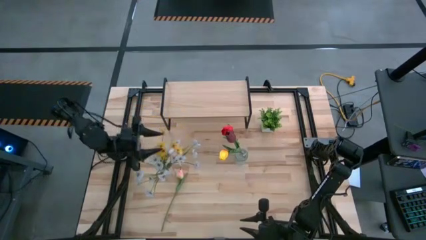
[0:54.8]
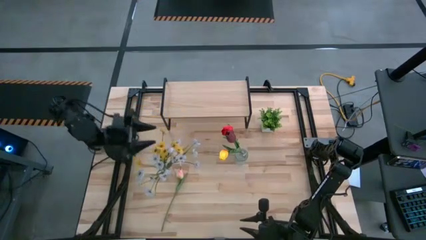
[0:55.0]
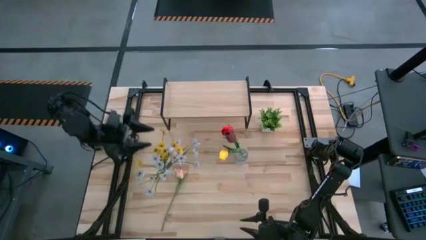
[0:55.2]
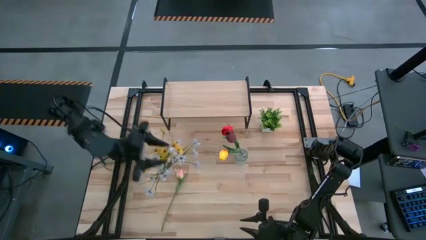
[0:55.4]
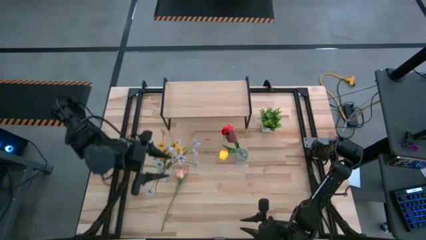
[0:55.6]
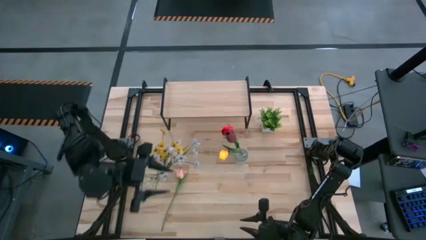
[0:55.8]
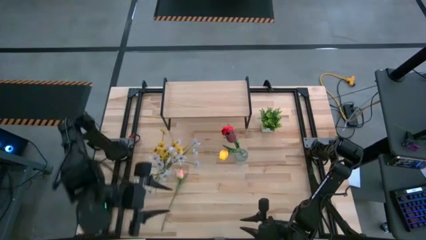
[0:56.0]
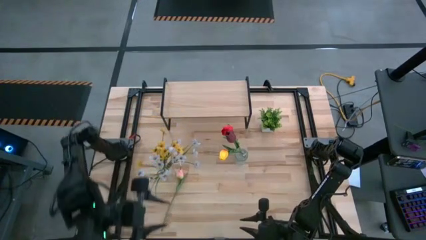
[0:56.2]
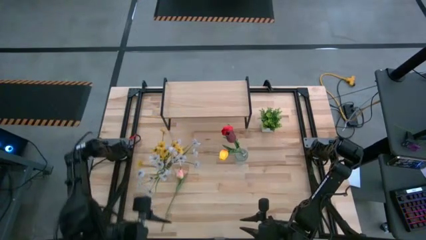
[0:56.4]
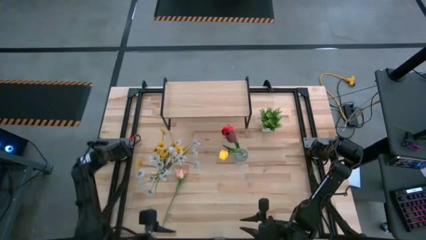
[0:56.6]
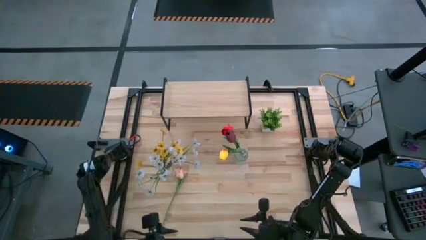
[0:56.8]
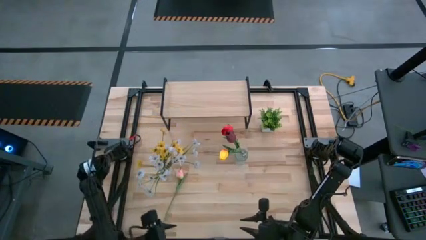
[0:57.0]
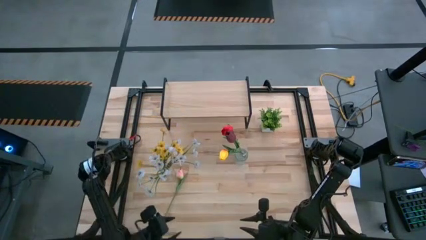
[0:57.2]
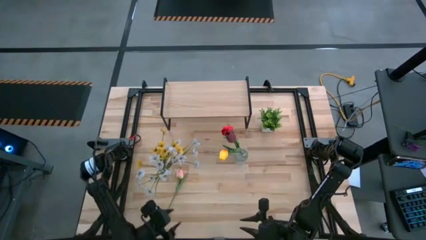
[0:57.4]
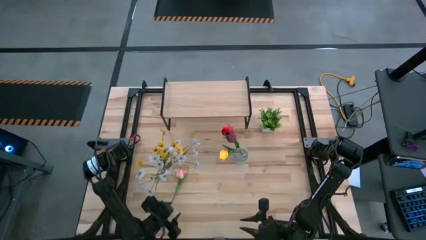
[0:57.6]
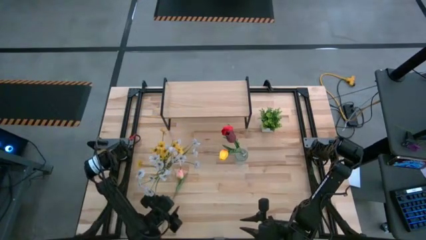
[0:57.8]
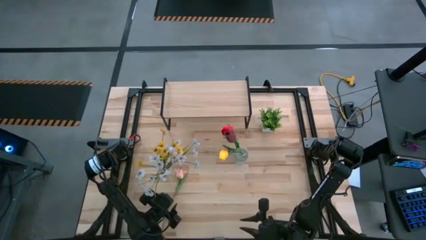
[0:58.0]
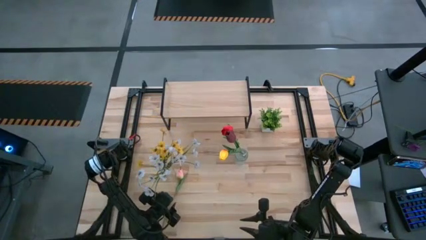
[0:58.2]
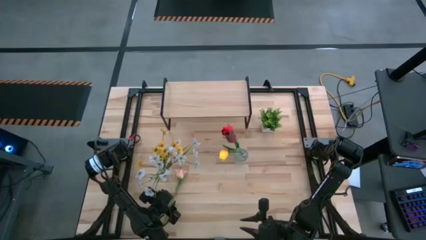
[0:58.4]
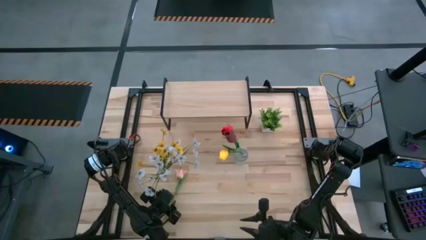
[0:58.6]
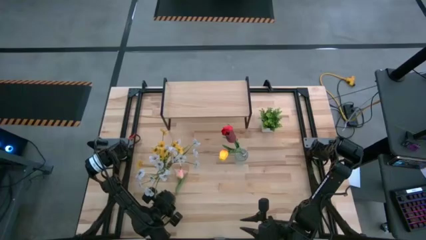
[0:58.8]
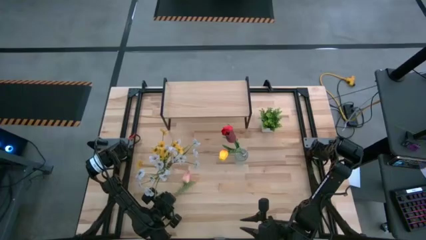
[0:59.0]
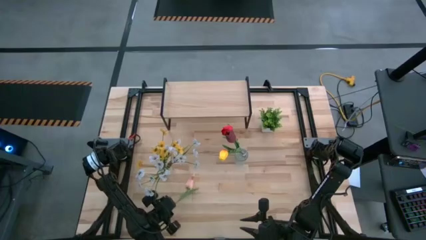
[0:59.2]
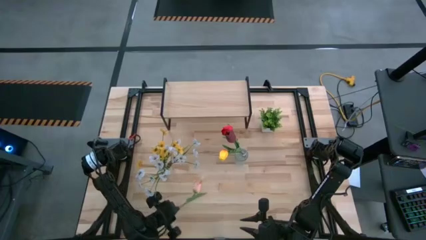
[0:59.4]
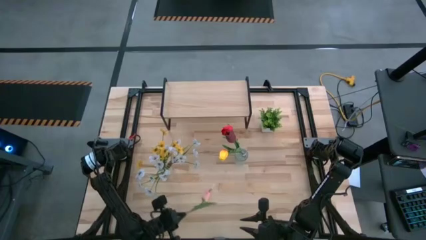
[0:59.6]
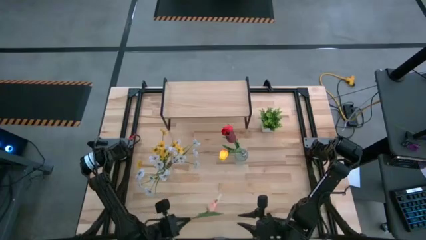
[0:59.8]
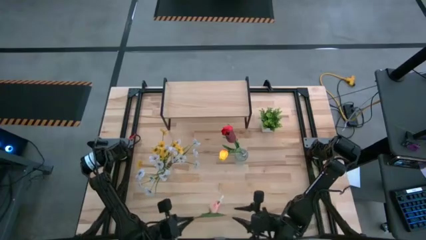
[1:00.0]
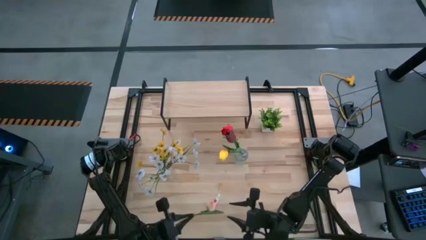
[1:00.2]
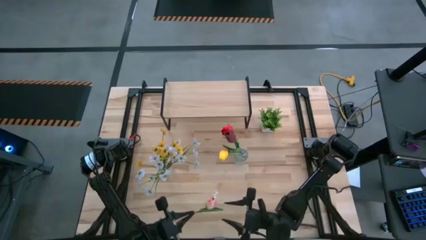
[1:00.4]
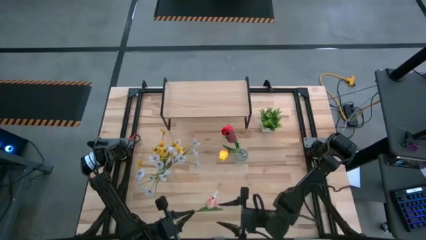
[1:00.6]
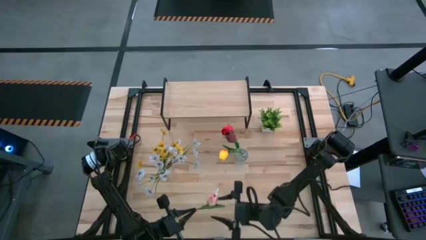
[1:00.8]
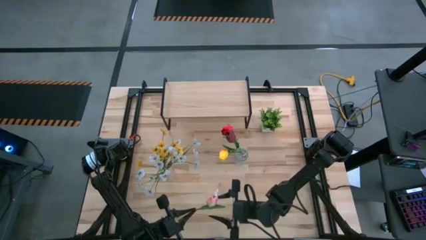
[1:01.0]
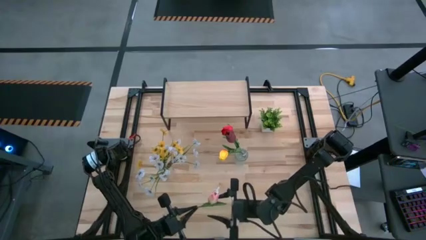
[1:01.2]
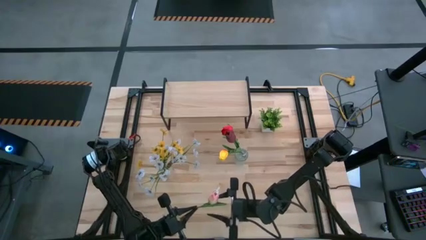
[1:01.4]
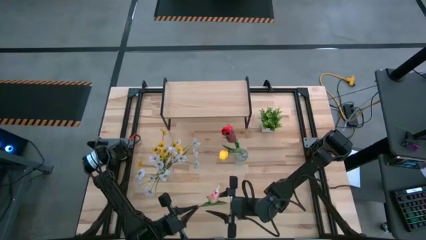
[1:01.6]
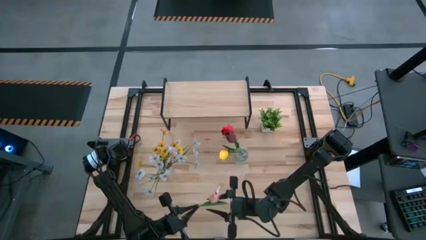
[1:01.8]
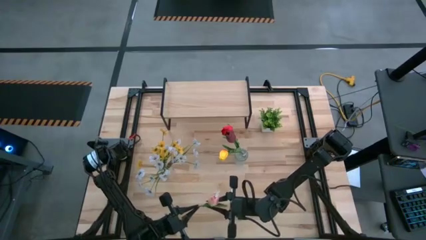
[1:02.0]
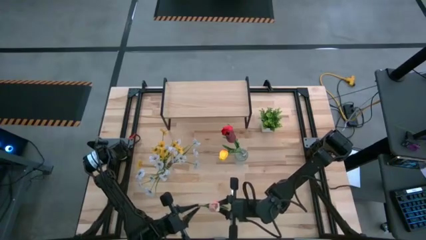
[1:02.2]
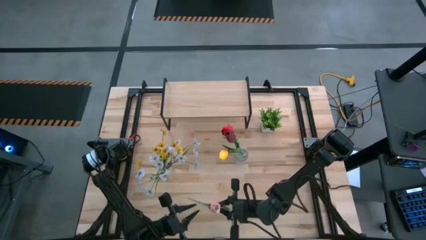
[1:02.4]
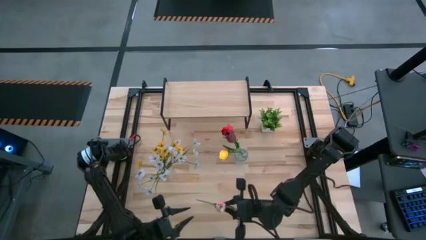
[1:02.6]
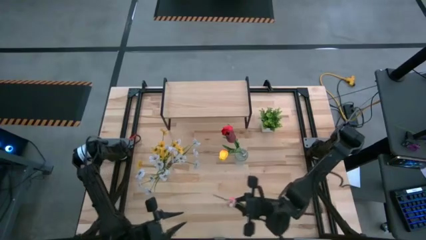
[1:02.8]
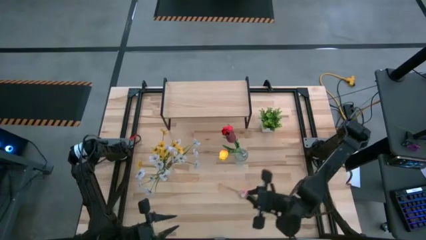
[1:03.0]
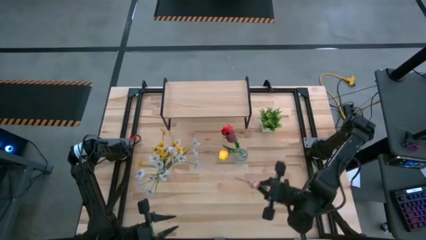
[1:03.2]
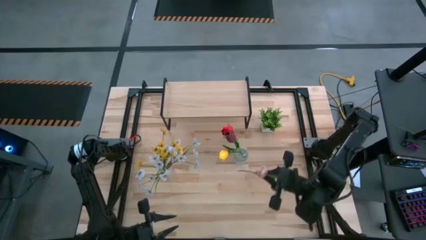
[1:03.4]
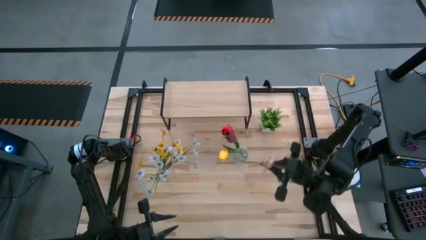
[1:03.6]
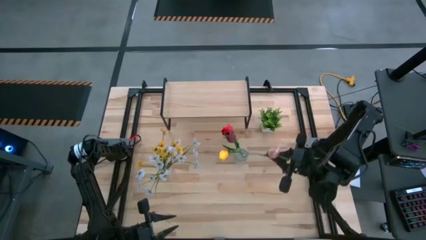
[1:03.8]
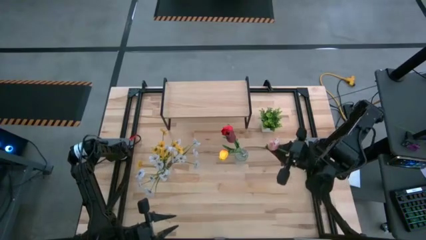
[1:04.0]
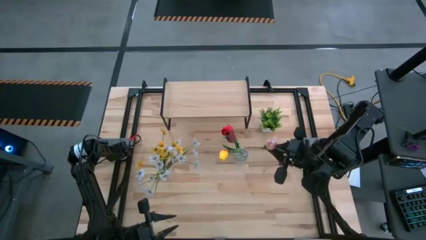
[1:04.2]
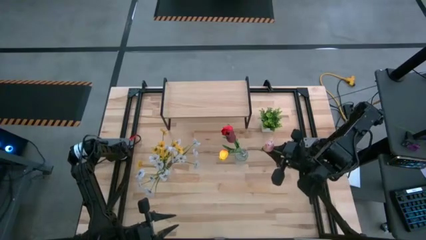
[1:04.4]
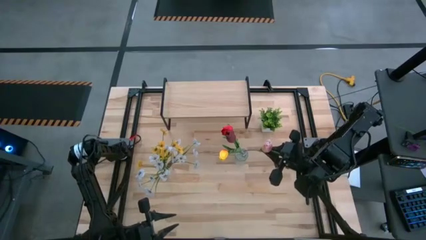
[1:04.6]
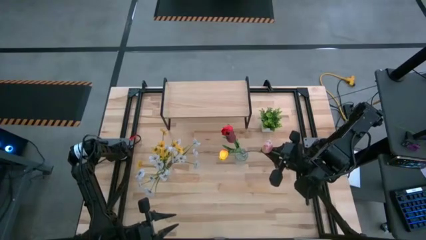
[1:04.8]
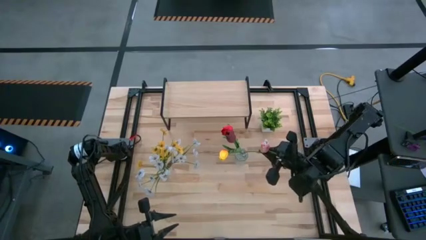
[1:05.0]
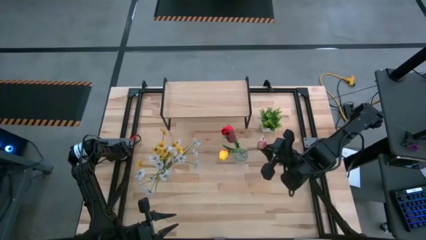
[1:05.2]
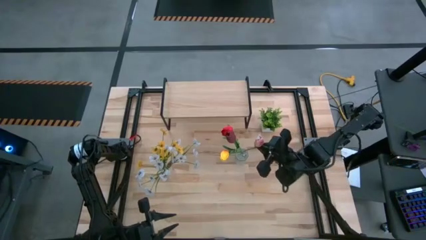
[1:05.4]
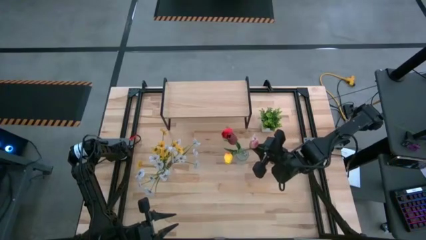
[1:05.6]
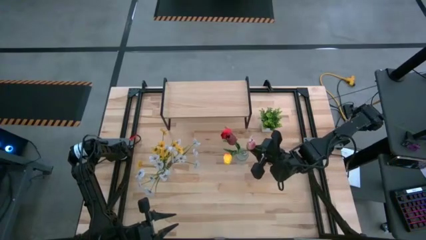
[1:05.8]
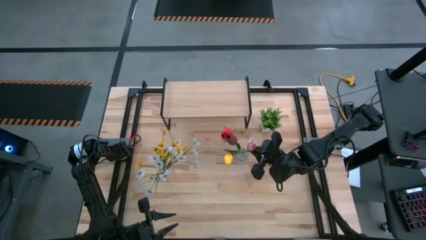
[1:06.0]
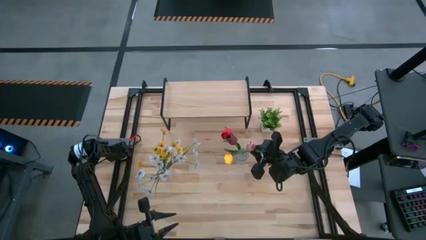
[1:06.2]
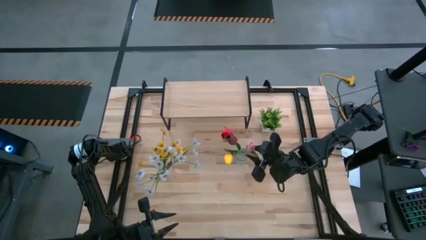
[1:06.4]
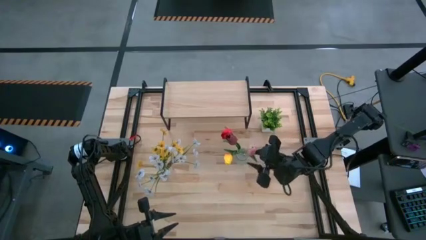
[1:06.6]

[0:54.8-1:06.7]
Task: Pick and place flowers into a vace then onto a shelf
Put the pink tulip into the top transparent vase

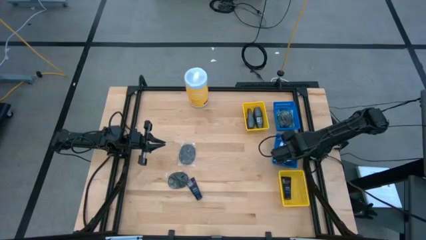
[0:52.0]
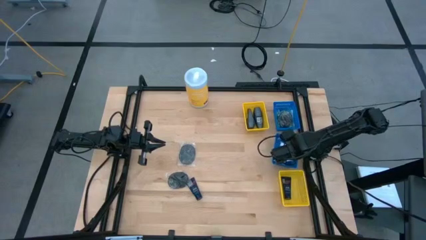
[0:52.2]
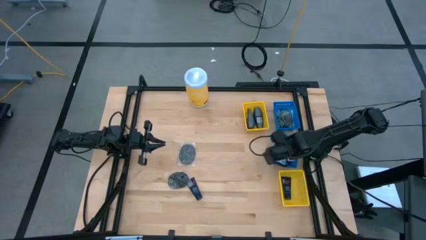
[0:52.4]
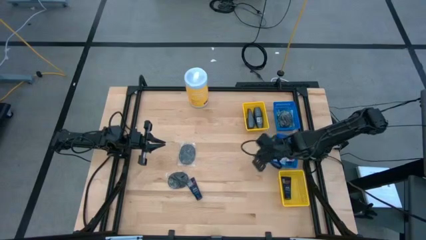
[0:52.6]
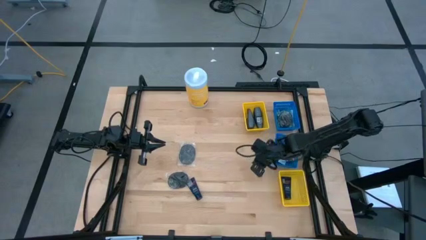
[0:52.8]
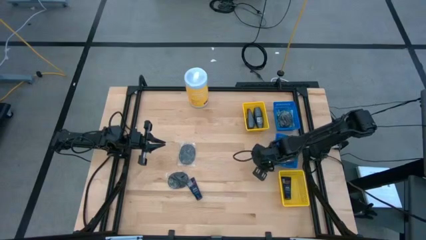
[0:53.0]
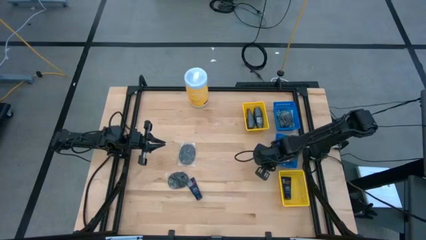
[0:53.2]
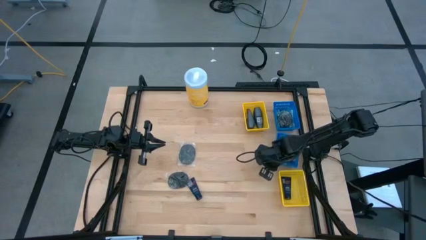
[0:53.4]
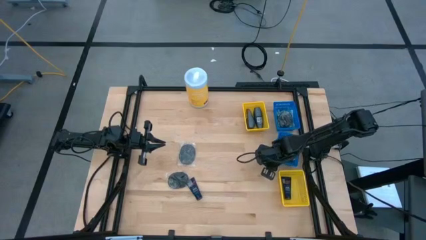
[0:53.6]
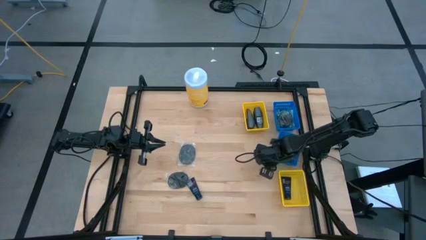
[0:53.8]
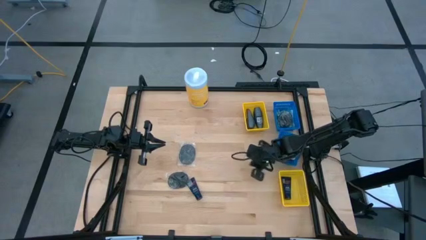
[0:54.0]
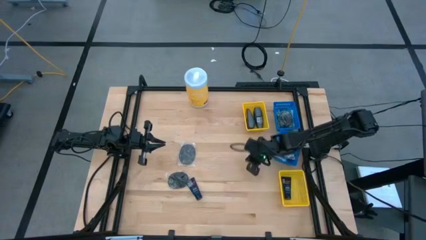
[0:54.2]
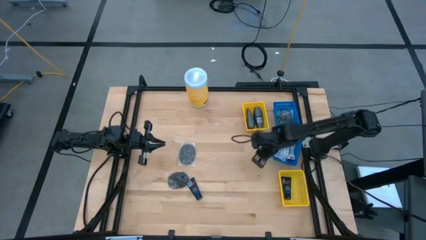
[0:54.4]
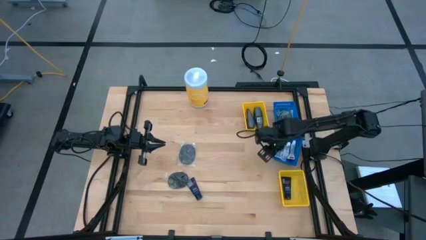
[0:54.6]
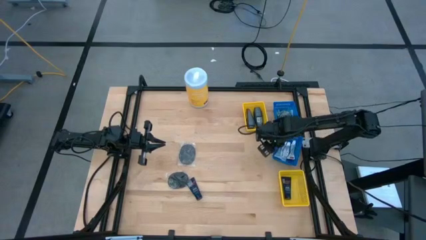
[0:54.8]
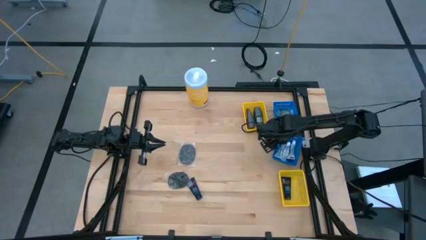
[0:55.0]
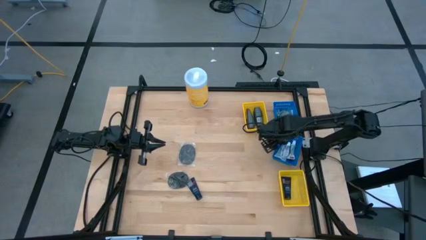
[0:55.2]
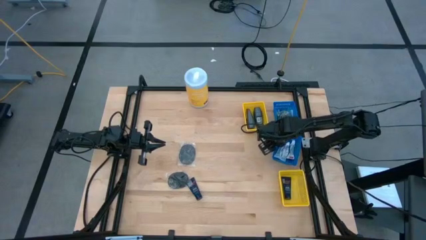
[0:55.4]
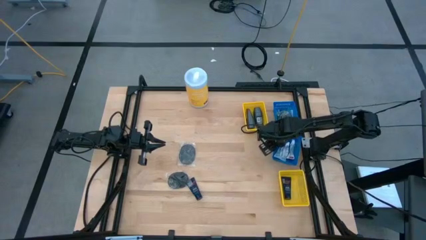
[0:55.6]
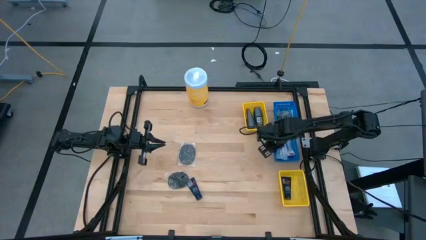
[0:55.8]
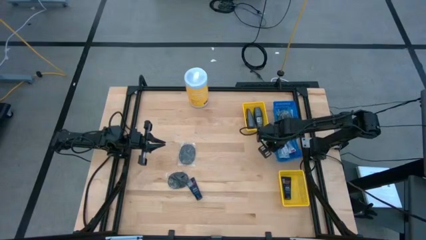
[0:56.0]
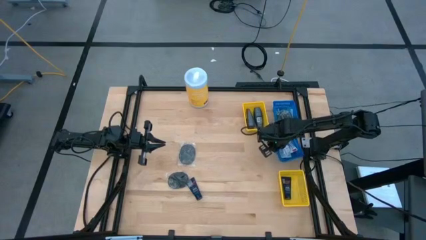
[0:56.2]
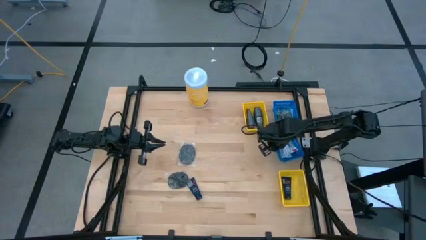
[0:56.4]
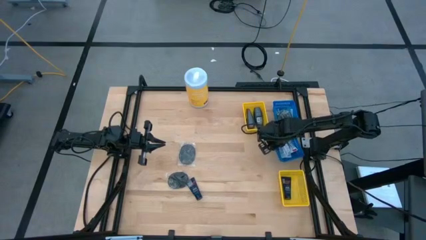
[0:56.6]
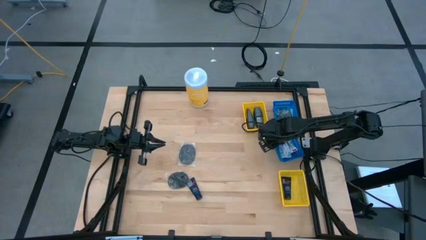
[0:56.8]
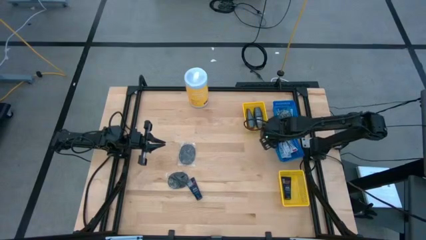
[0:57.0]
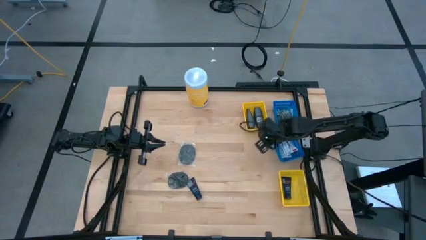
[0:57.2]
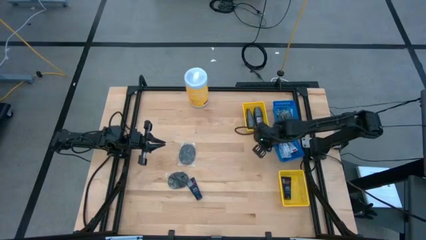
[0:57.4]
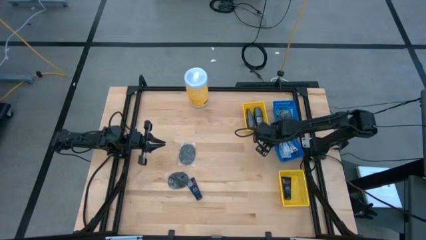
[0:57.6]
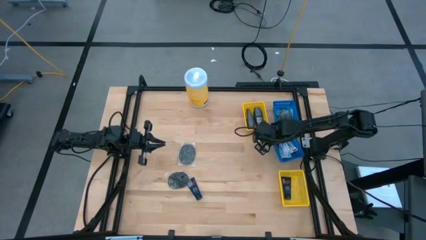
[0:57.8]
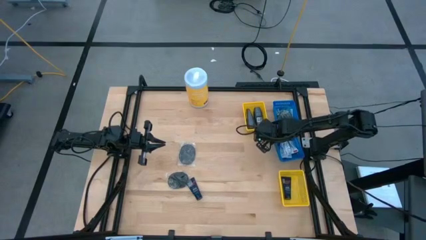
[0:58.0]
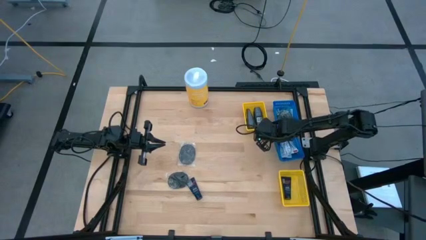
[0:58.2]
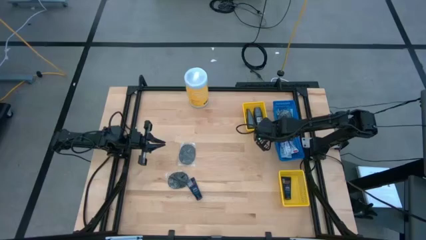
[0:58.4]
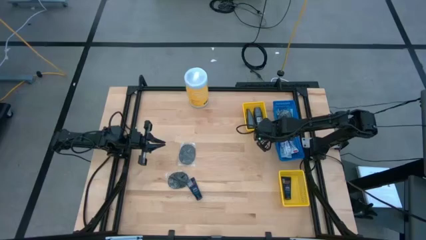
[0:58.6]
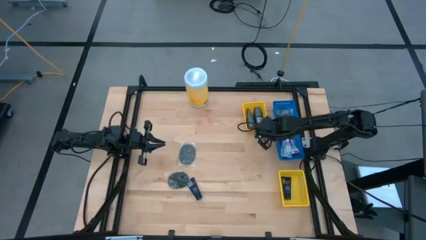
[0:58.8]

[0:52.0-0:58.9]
Task: Pick & Place Travel size toiletries
Adjust the bottom blue basket
